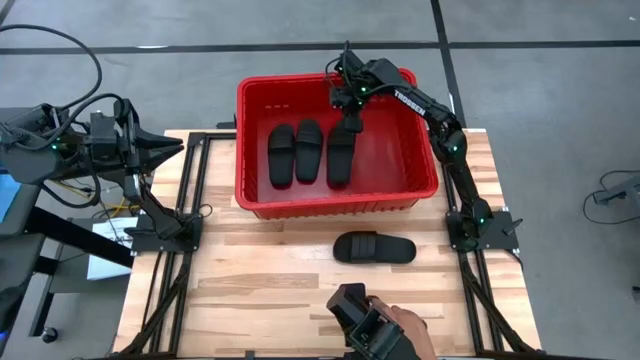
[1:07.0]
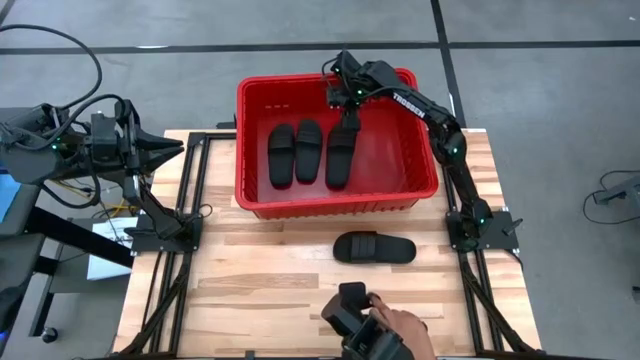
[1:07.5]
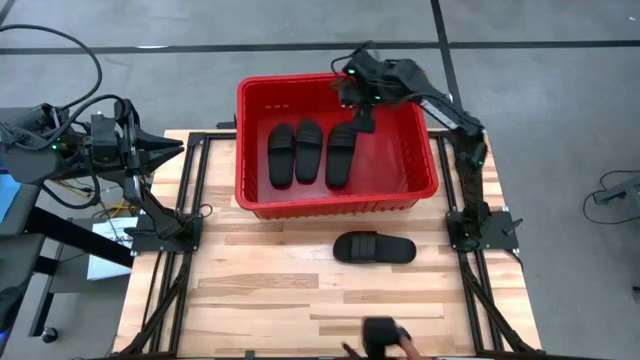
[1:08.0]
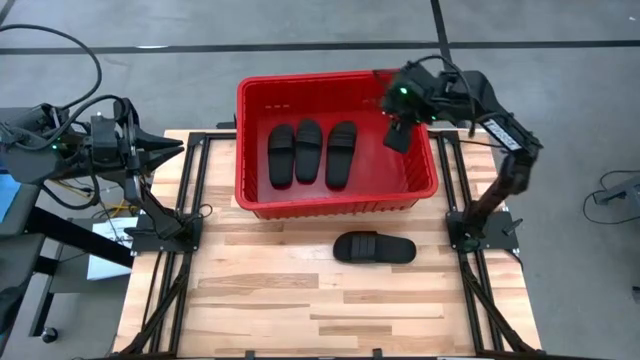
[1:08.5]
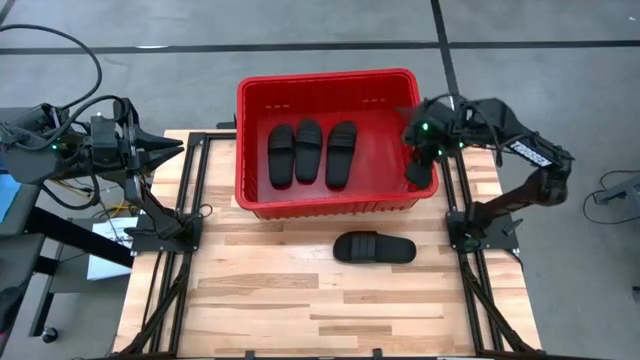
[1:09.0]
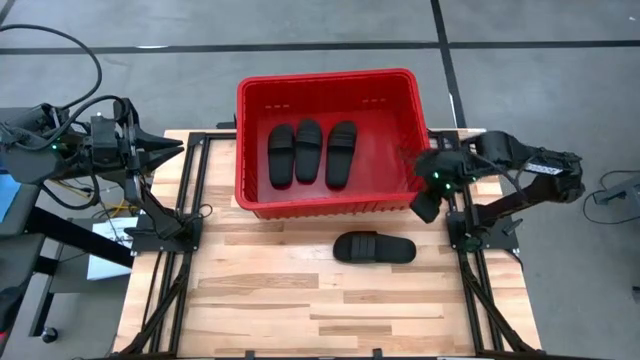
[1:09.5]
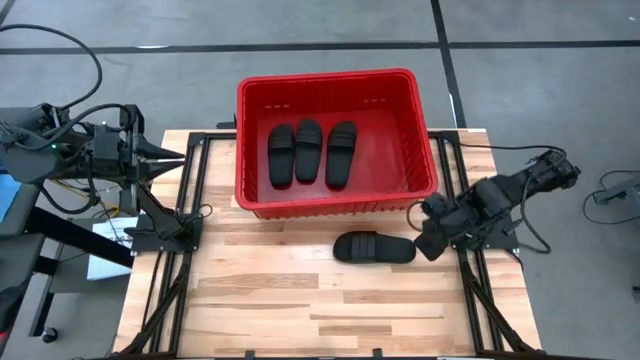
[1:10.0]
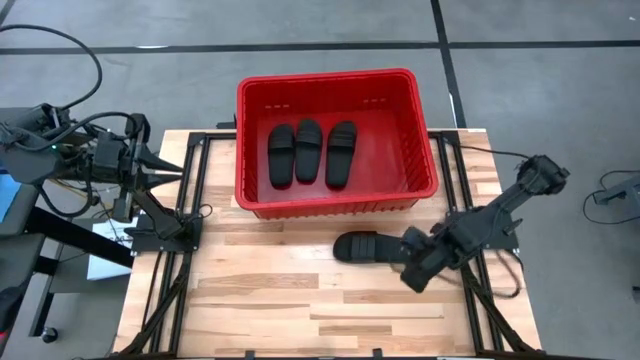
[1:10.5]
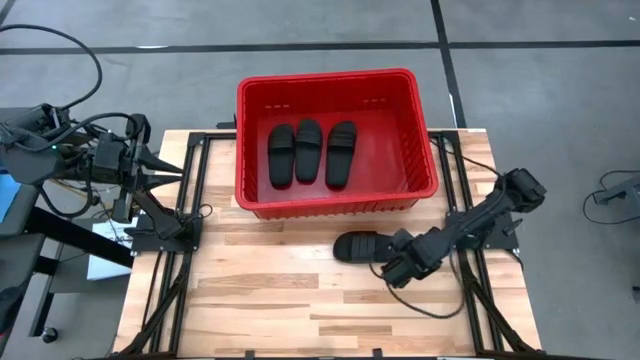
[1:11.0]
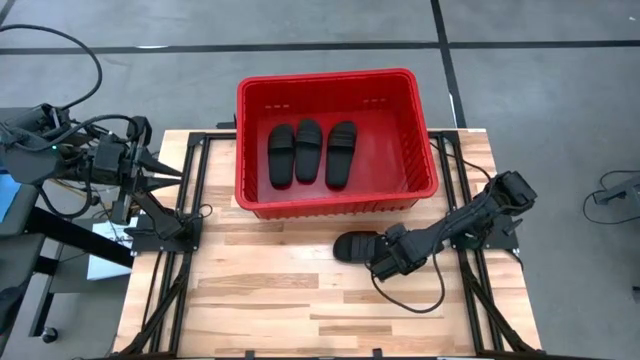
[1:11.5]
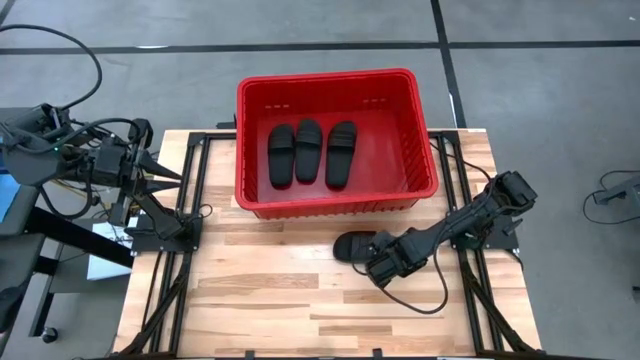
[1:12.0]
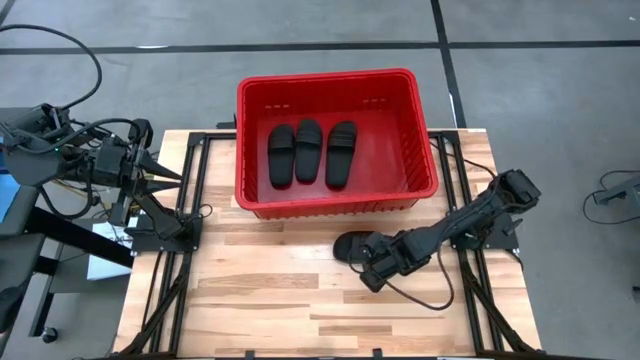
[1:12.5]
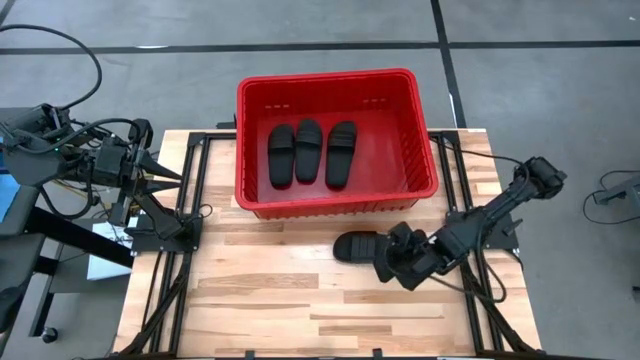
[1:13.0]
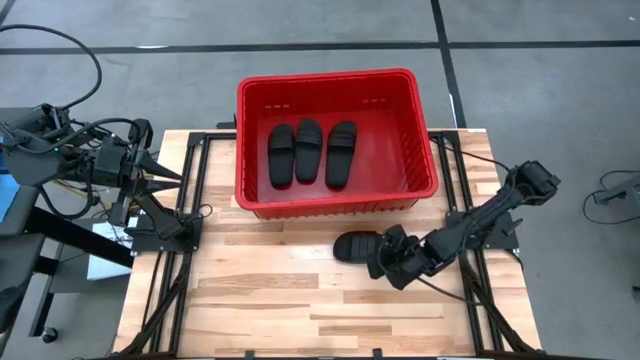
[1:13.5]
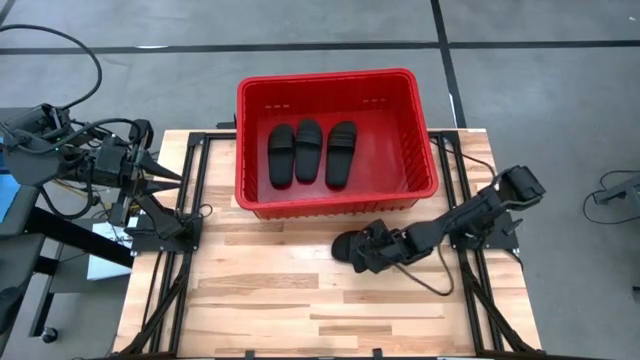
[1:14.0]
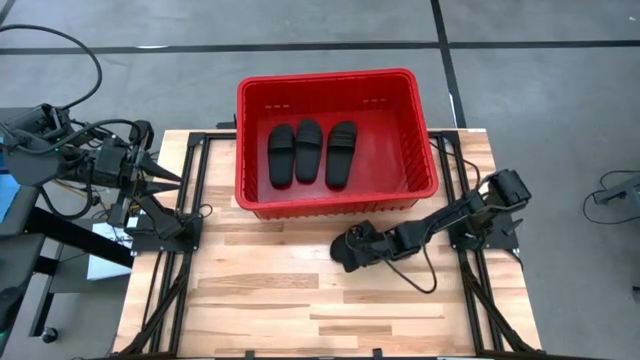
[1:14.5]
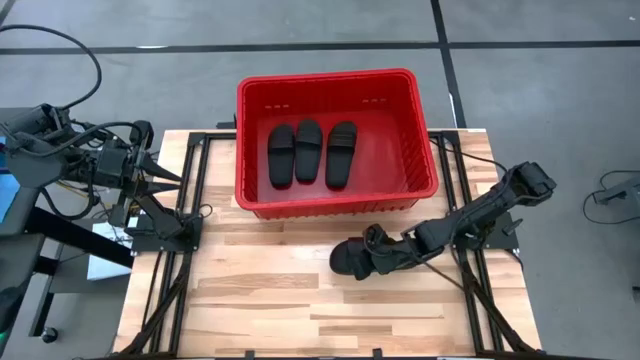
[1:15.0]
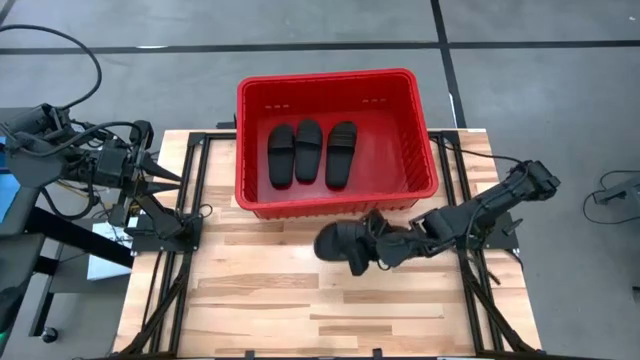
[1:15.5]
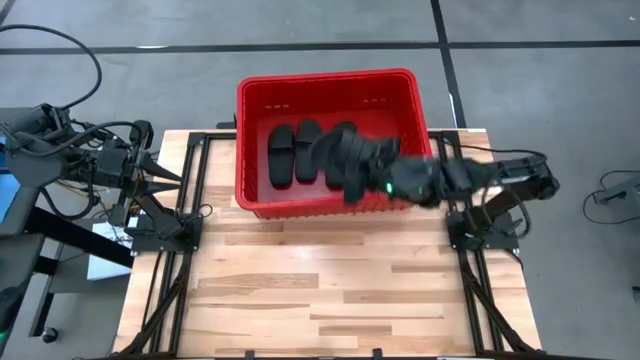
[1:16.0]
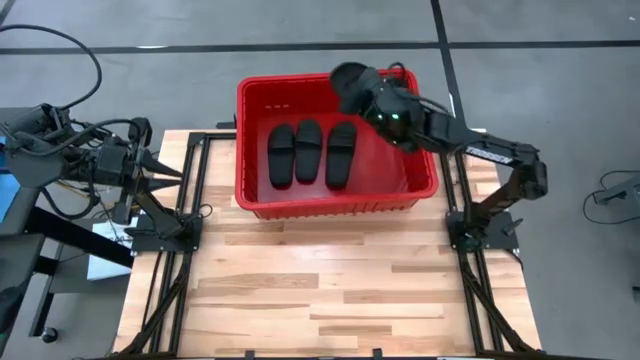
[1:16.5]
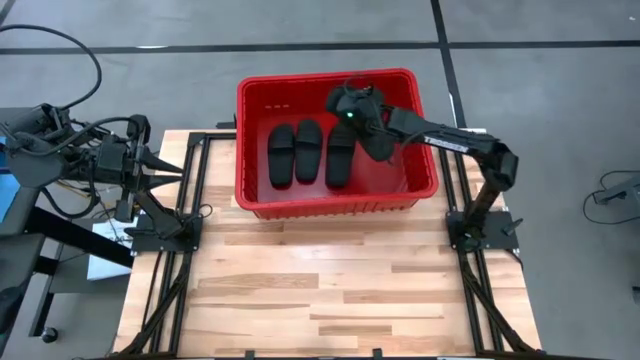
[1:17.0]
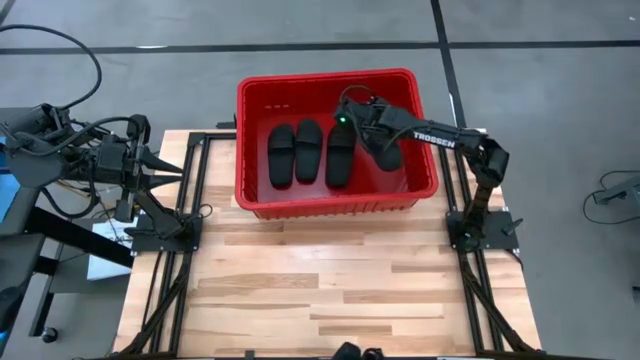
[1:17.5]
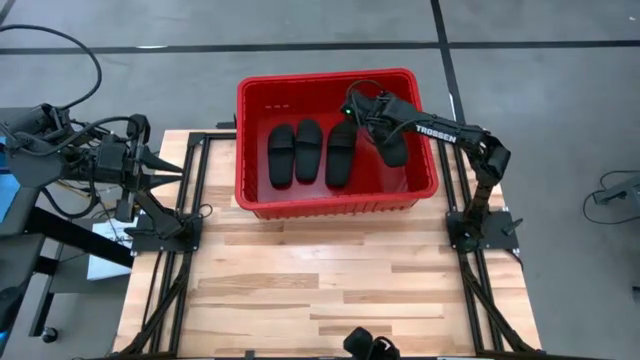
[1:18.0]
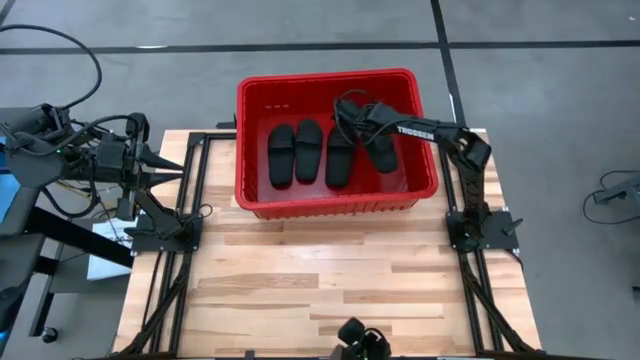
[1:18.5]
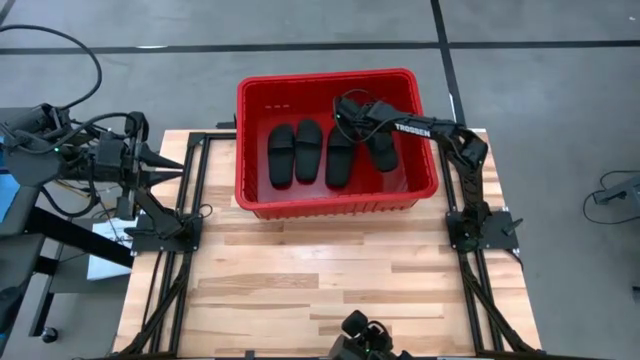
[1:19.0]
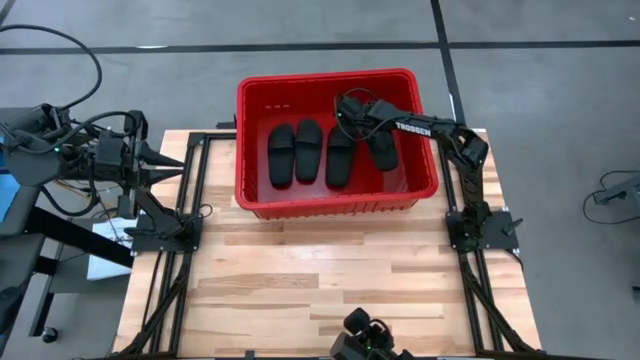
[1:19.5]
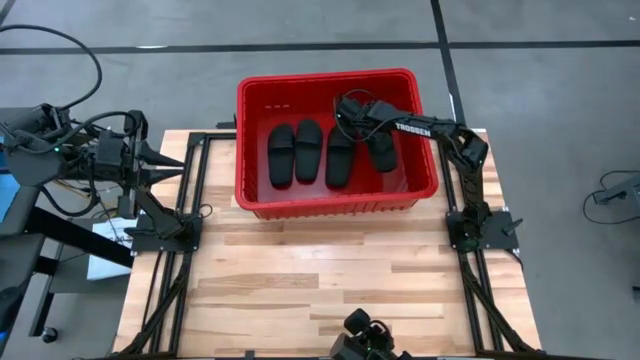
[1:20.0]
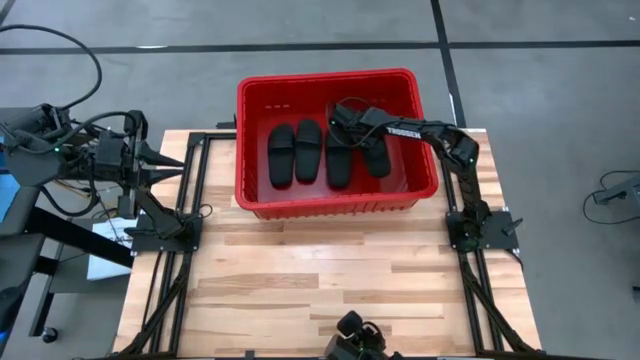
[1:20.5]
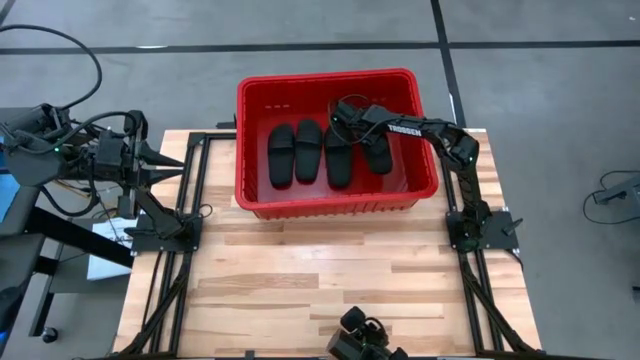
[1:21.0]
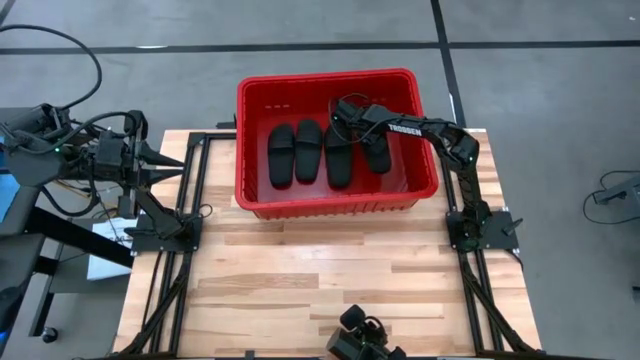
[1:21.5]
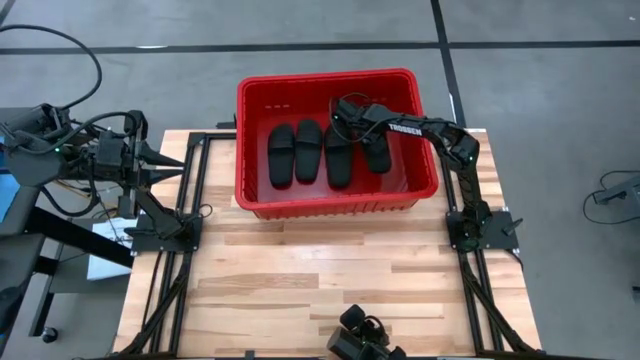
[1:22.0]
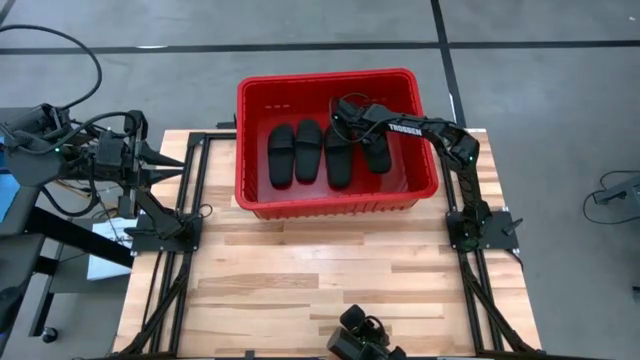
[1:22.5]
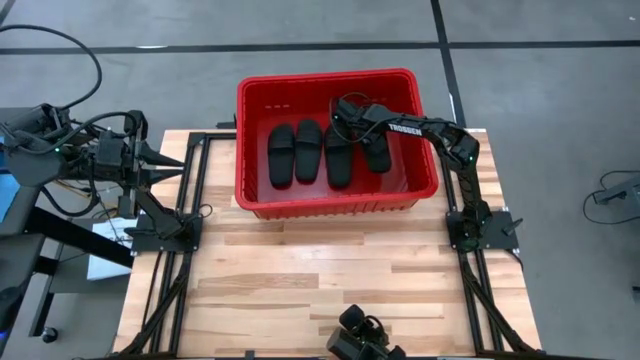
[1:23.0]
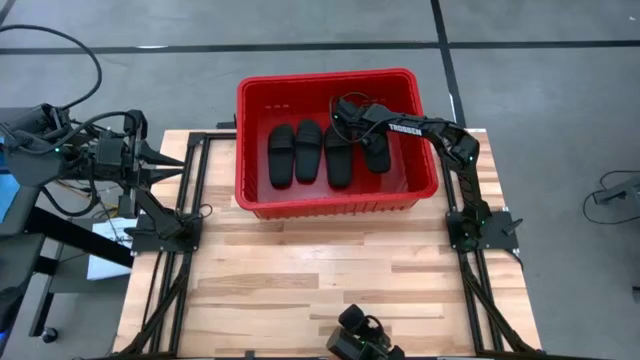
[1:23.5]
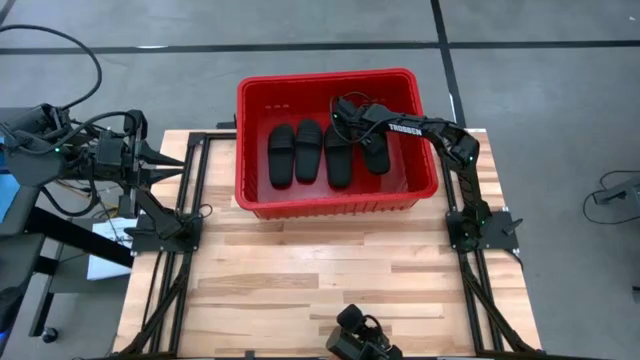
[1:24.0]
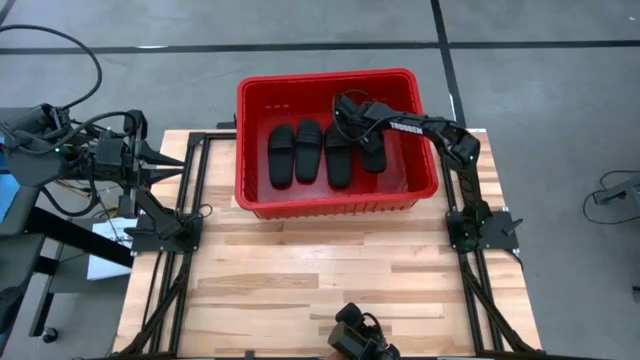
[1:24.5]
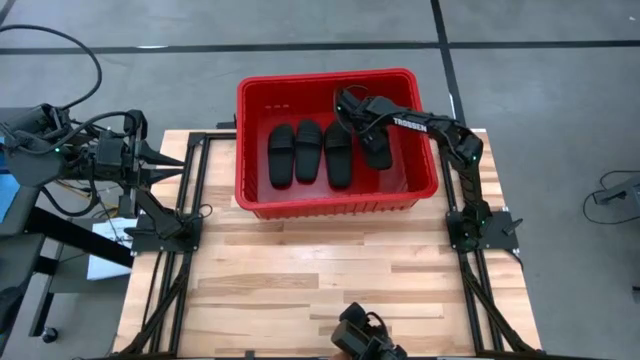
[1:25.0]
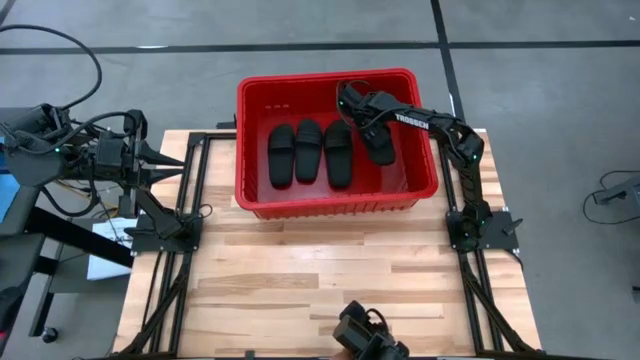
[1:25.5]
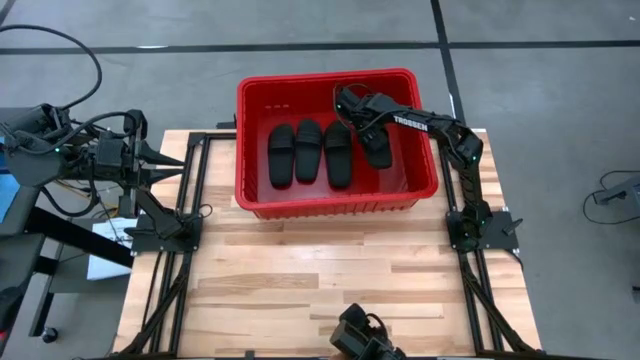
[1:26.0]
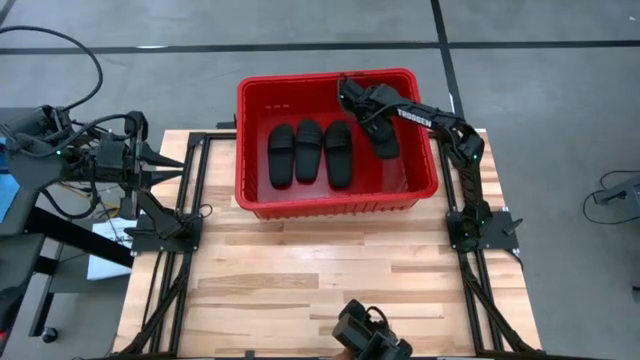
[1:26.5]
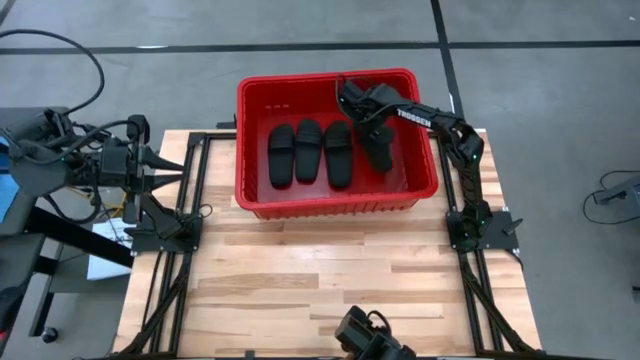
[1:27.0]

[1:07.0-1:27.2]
Task: Pick and place slides into bin
Put the black slide into the red bin

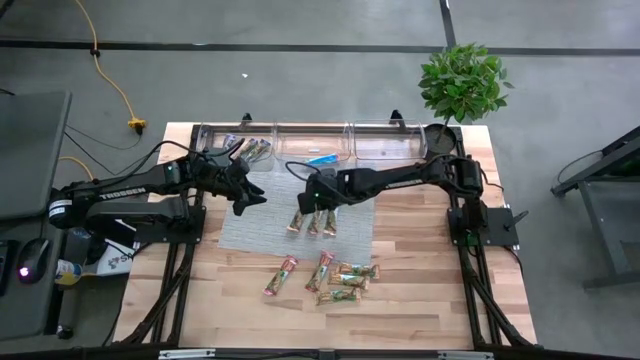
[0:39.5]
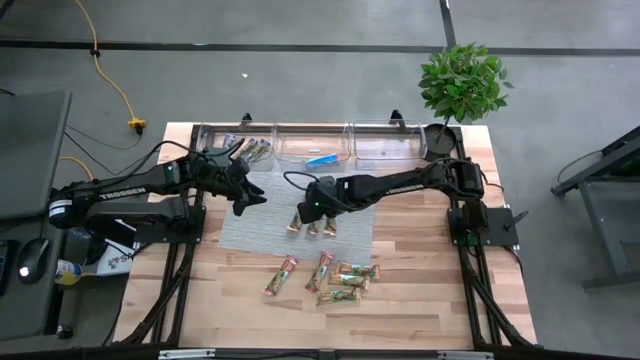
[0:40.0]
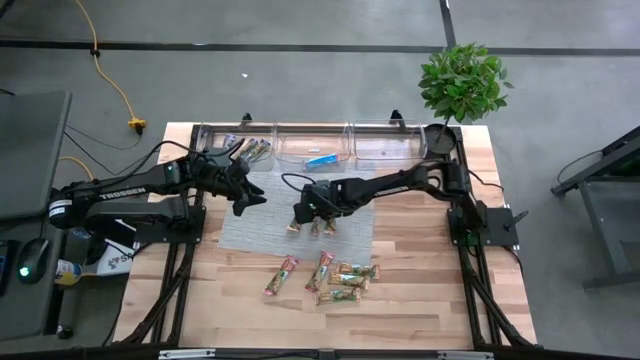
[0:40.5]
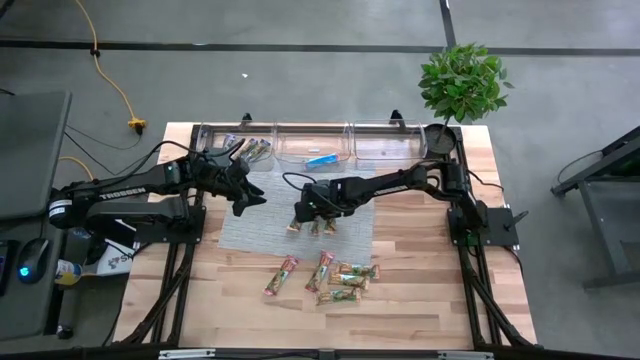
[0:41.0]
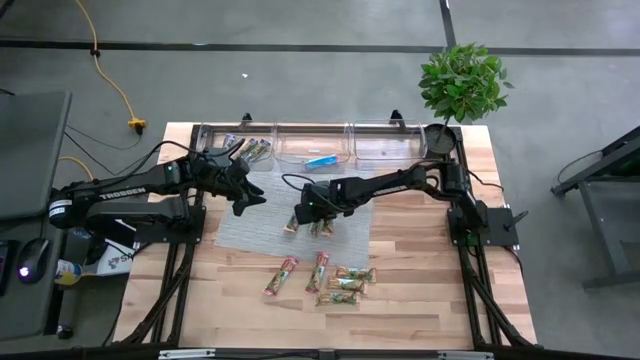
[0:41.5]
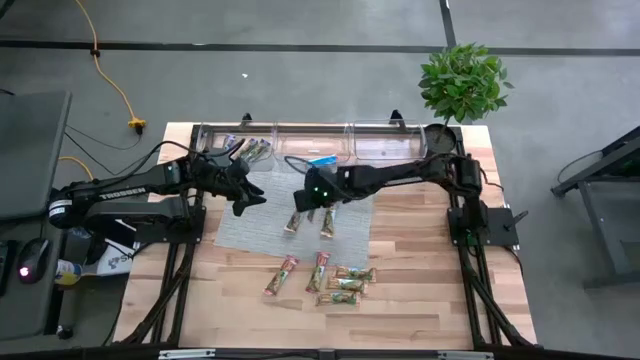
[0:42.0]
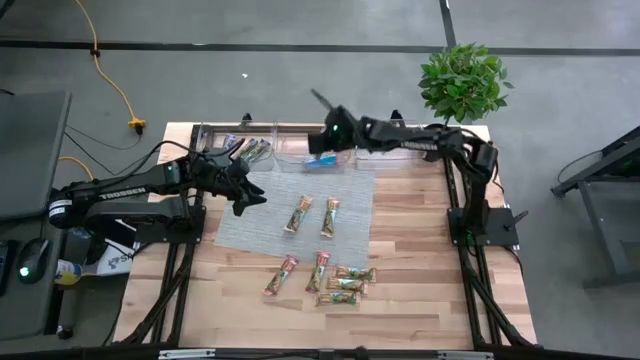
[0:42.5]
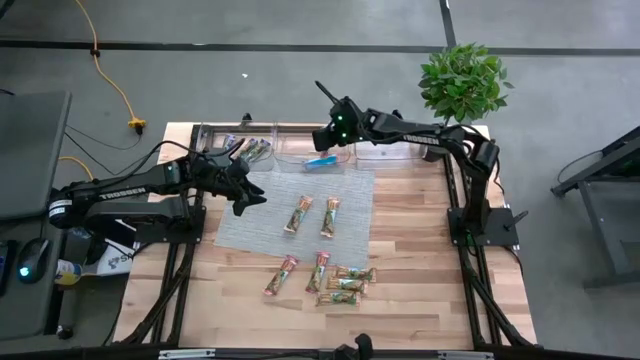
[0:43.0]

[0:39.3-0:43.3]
Task: Pick and place Granola Bars by type
Put the red granola bar into the middle transparent bin
